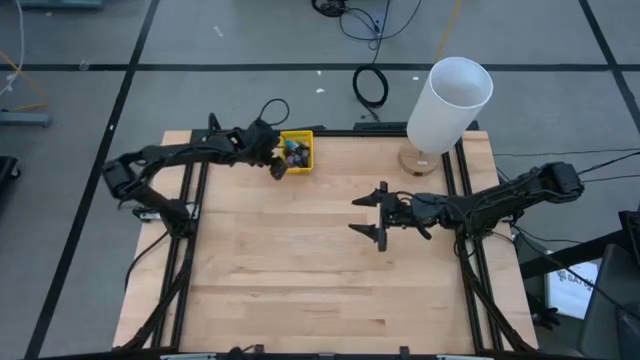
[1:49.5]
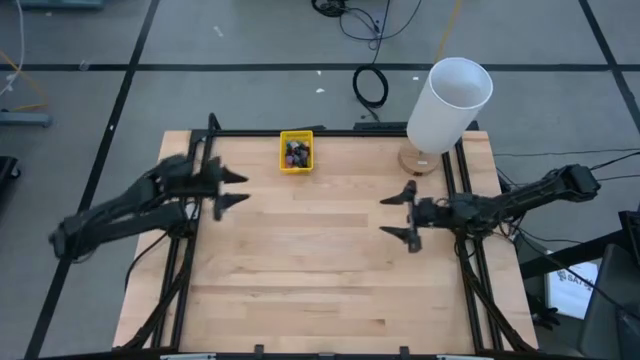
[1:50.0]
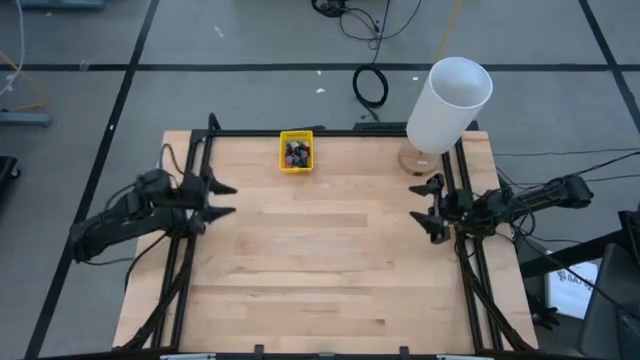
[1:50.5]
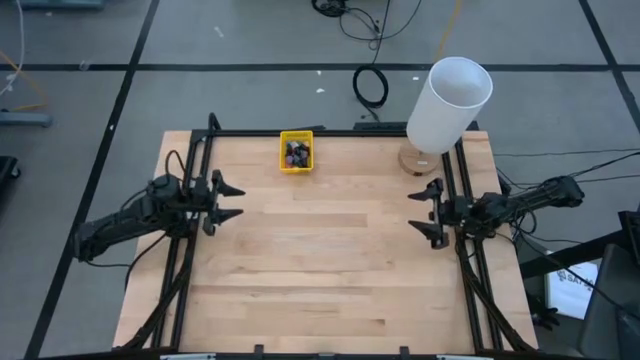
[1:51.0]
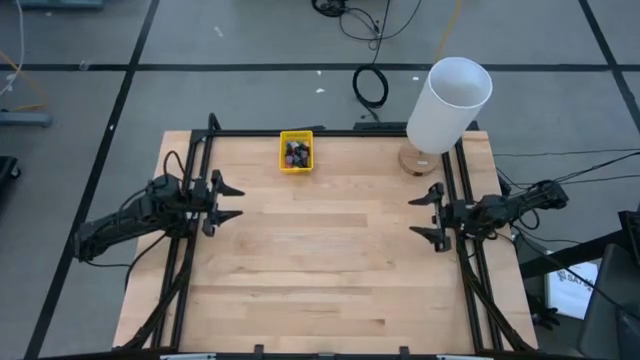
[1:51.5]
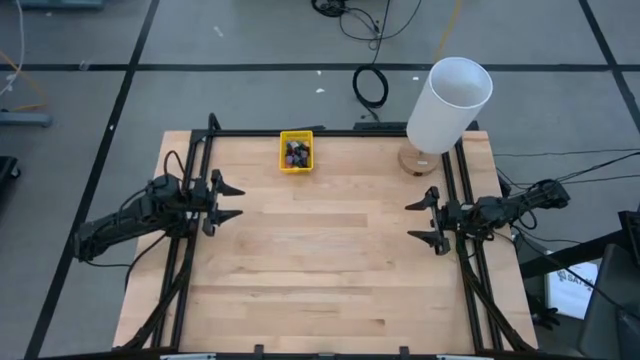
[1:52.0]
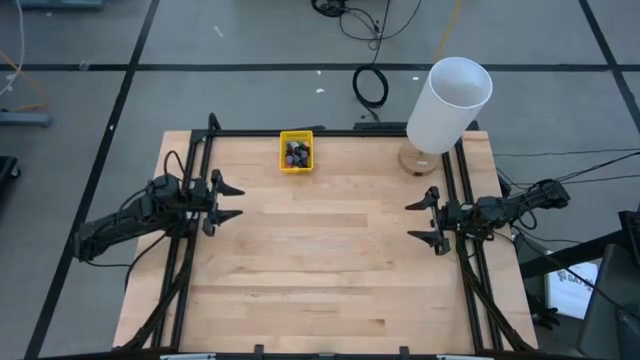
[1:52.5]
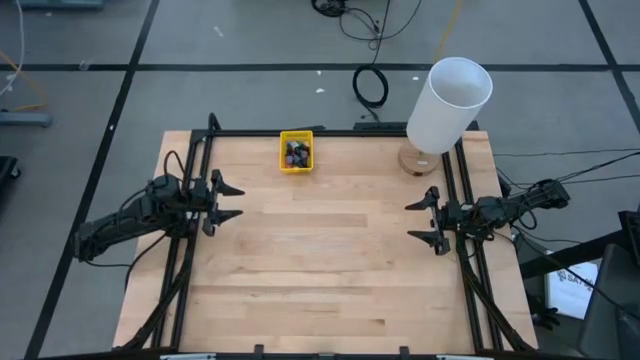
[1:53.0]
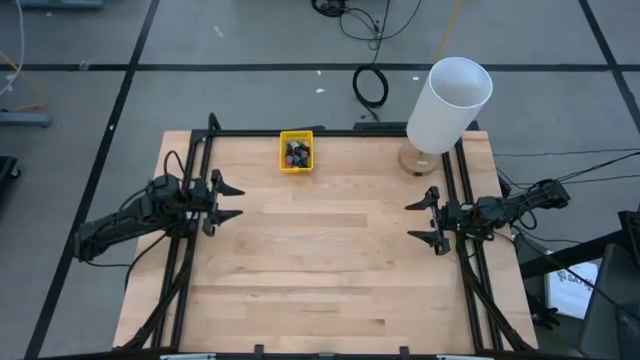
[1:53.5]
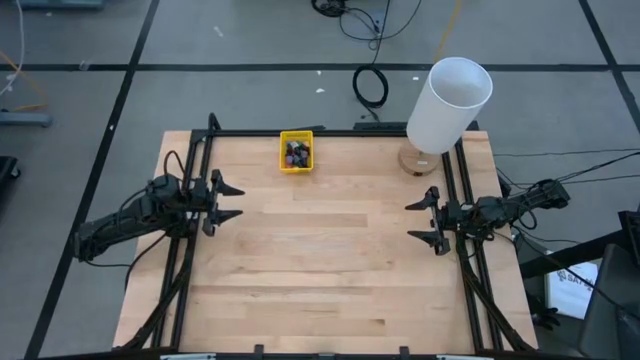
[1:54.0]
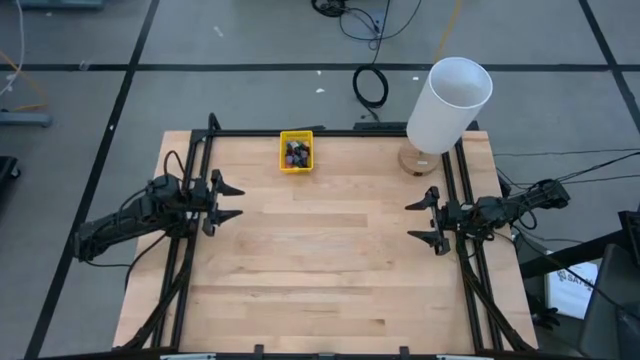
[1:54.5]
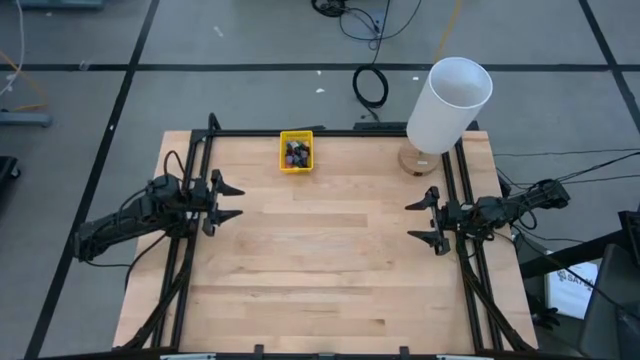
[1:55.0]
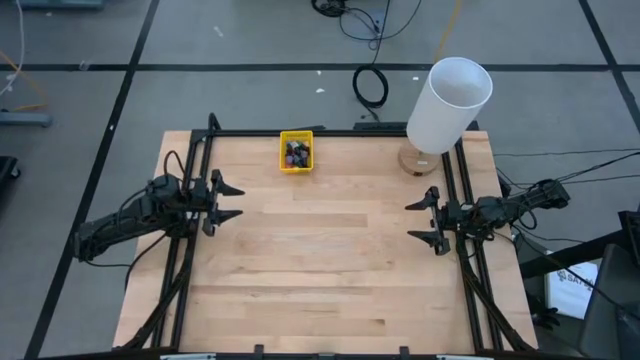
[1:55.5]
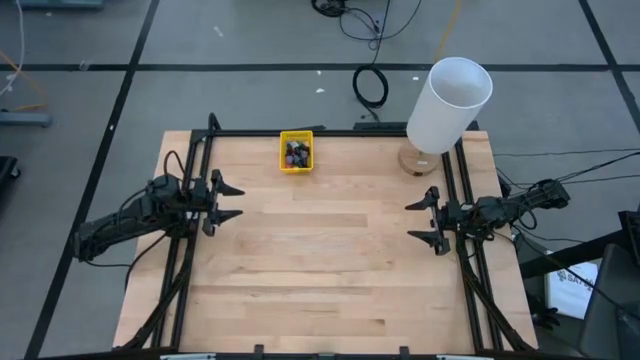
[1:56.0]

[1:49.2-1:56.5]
Task: Pick & Place Nail Polish
Return to Home Position

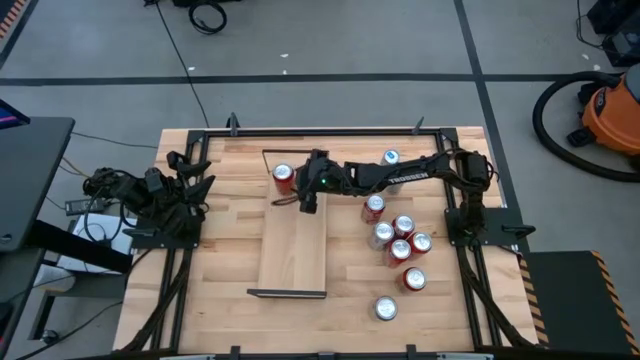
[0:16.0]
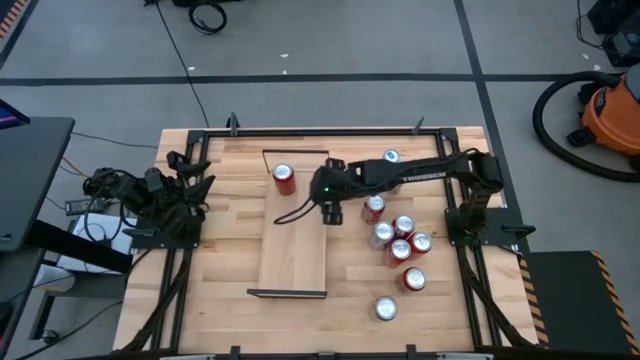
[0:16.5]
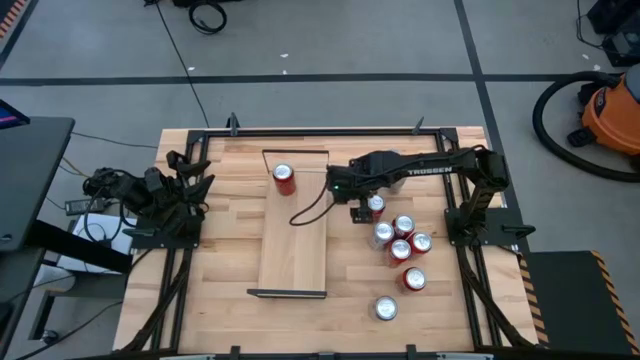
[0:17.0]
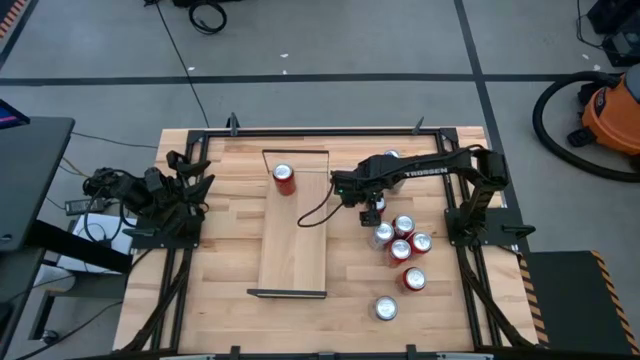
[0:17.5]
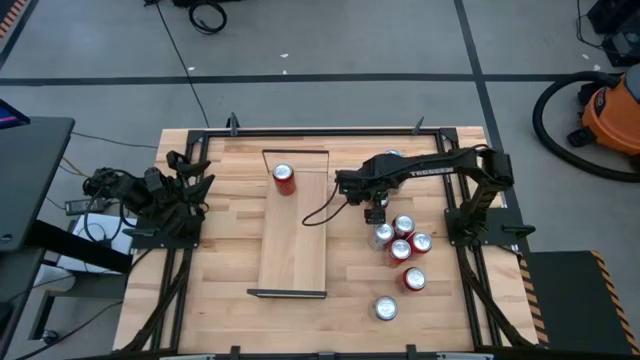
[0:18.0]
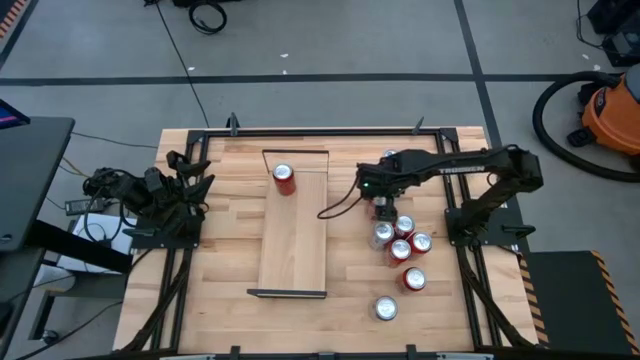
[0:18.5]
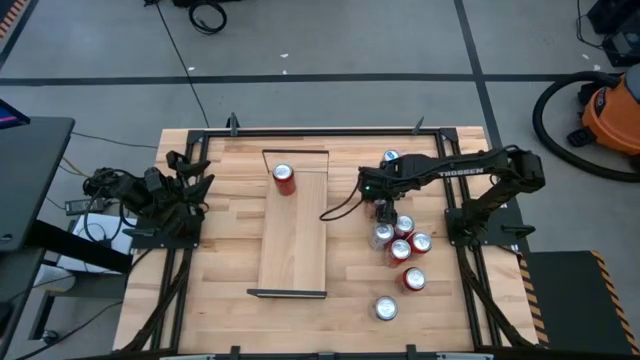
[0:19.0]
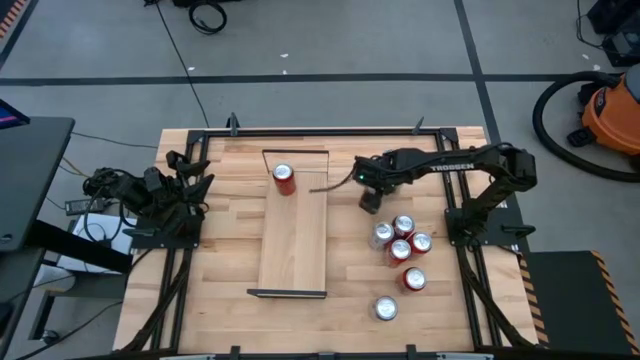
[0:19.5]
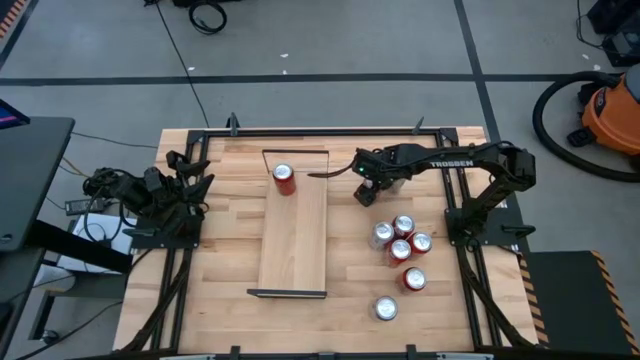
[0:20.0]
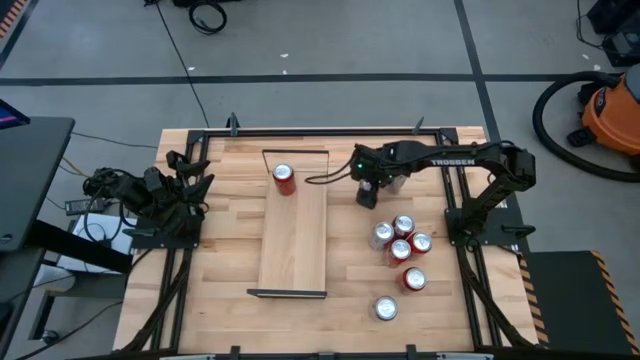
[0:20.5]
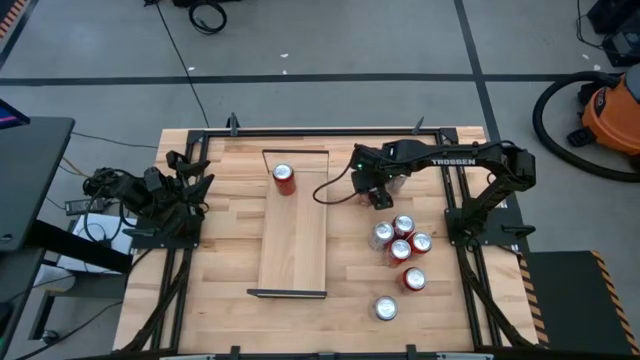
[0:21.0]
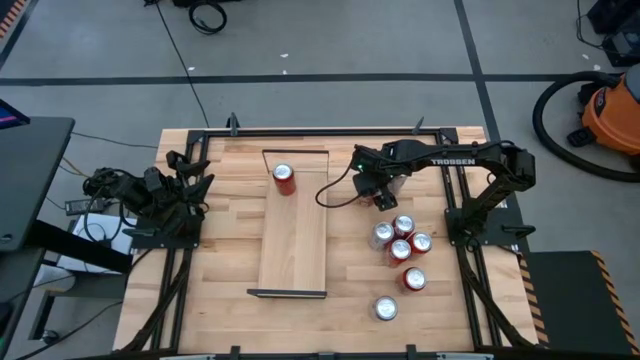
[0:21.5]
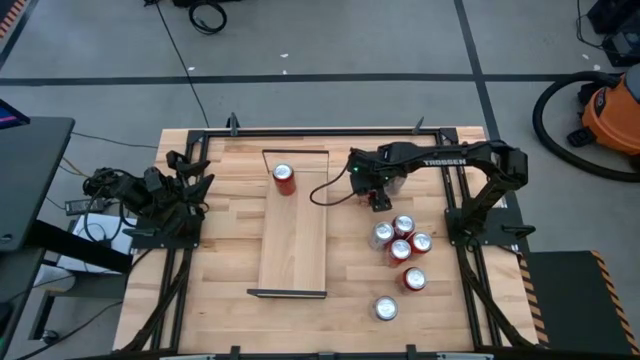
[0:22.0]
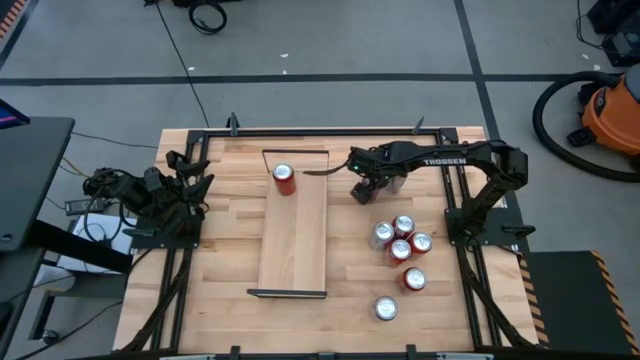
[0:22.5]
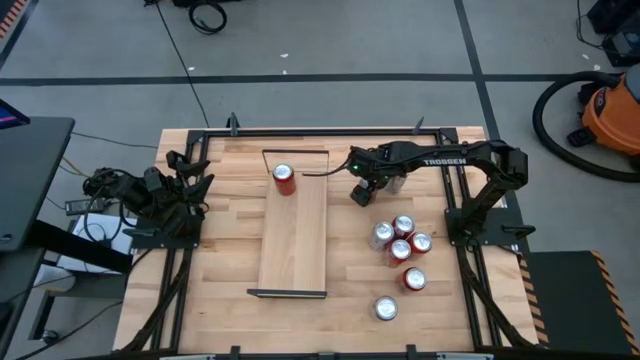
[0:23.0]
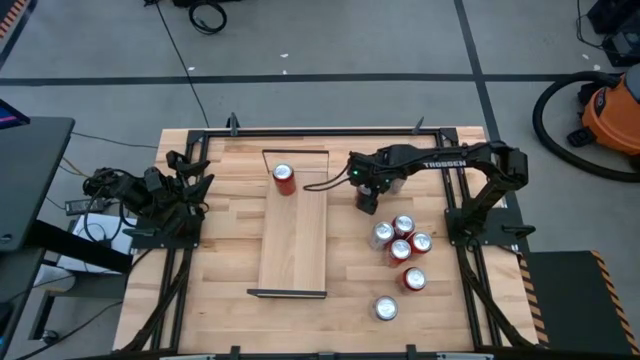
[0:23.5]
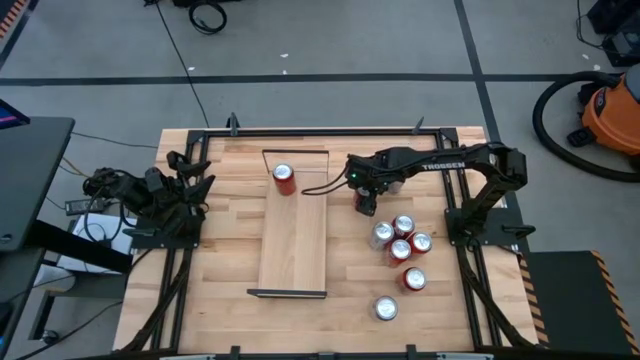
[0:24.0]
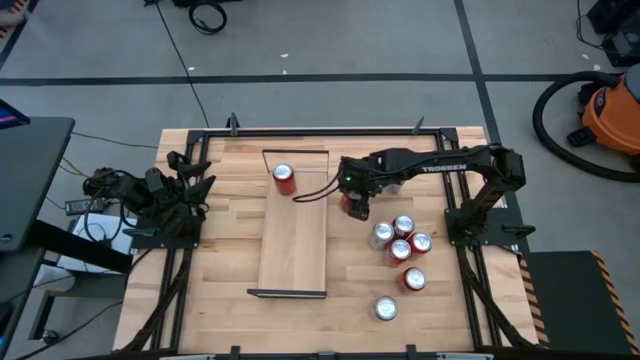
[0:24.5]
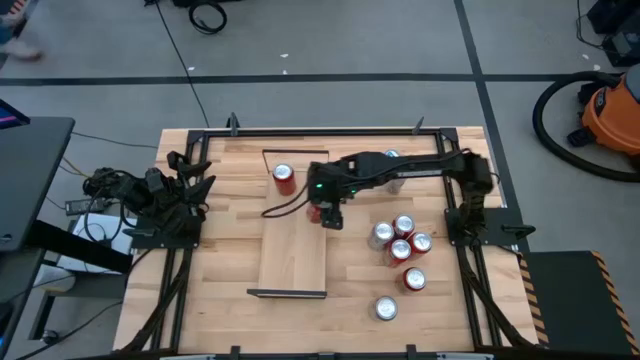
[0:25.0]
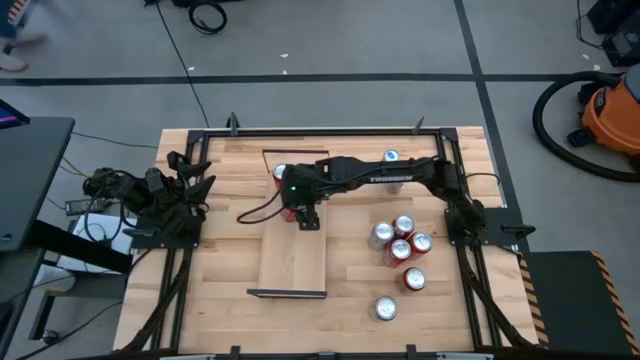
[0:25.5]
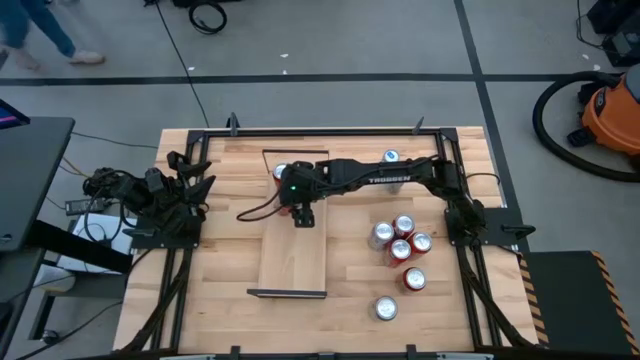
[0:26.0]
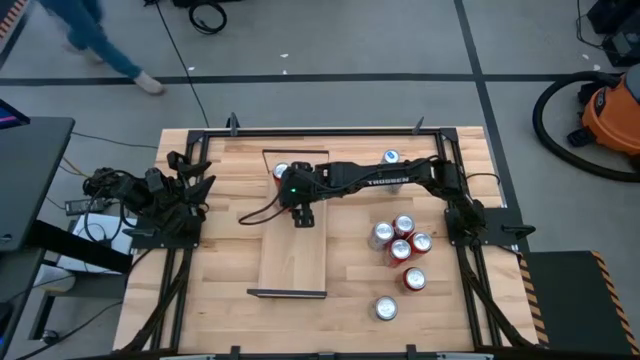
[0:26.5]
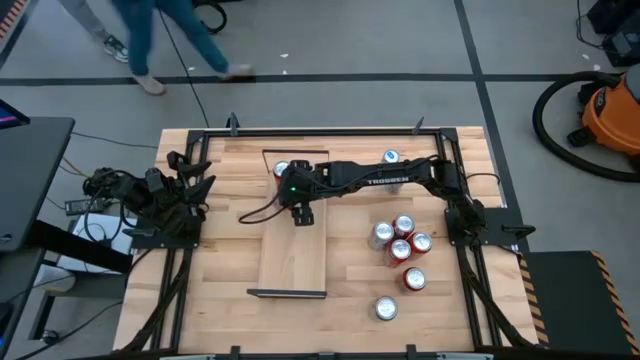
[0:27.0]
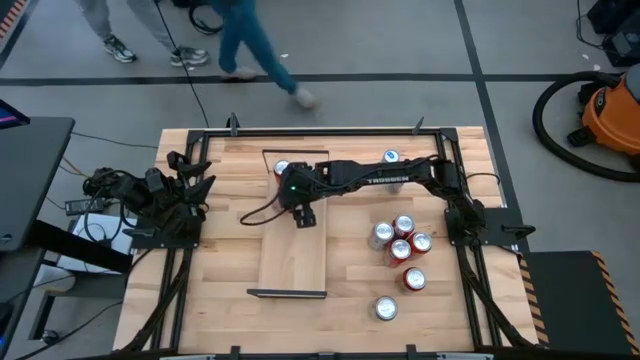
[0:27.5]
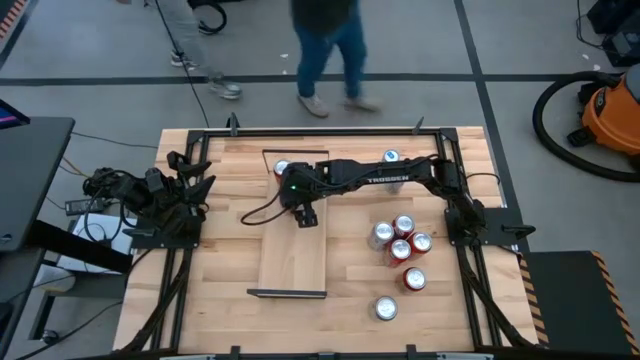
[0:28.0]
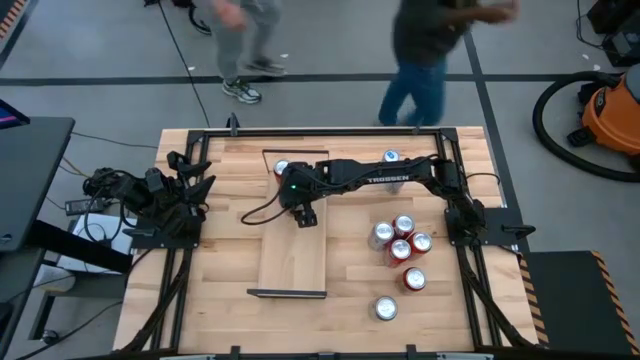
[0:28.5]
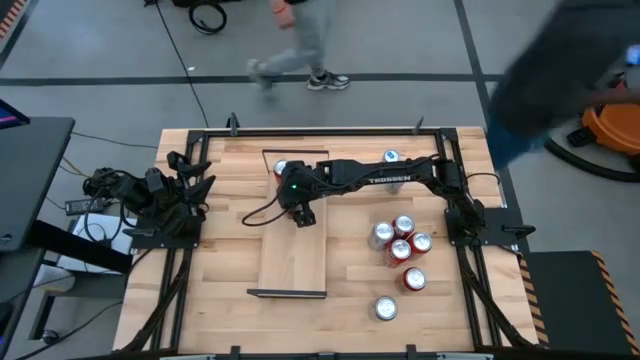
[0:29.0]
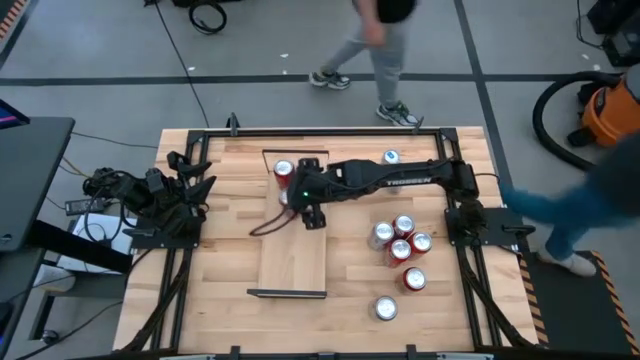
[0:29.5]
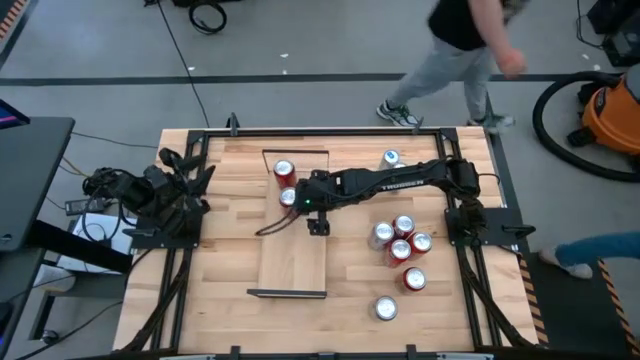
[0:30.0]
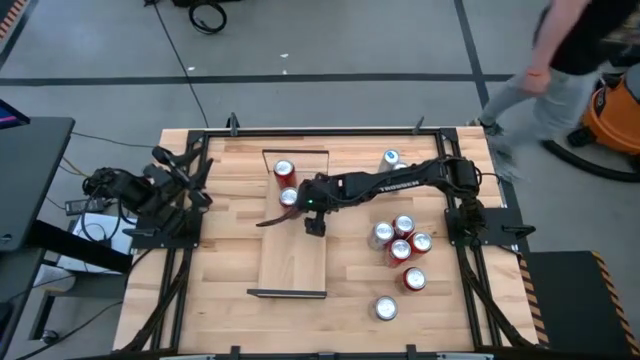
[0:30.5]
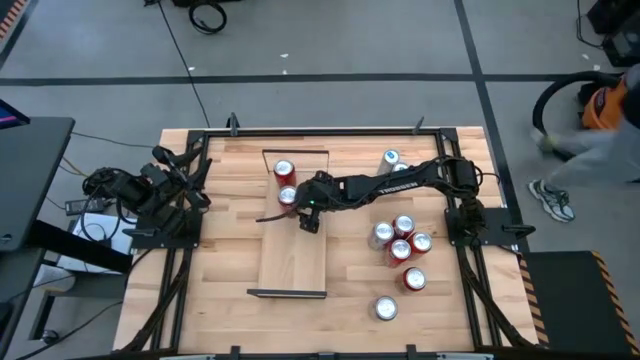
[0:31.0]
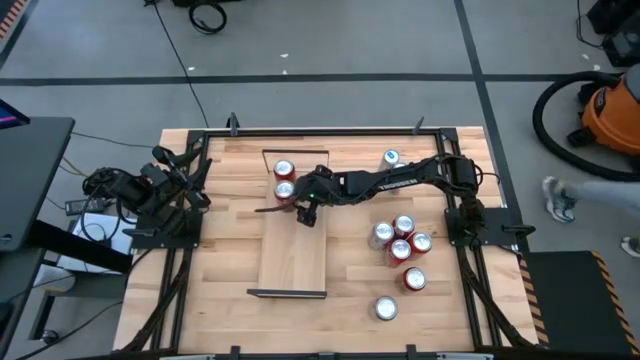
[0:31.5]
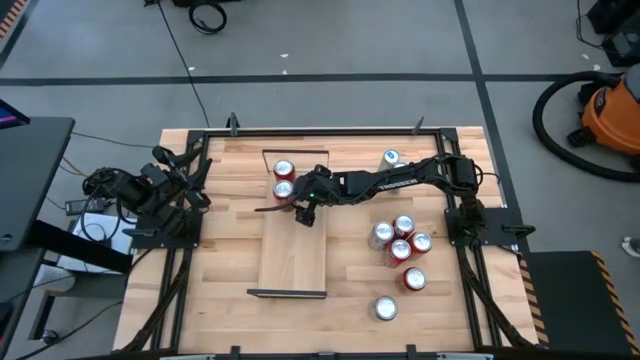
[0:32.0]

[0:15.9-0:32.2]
Task: Place canned beverage on shelf
Put the top red white soda can on the shelf
